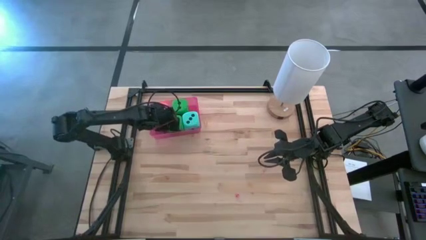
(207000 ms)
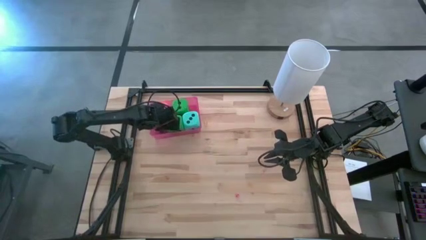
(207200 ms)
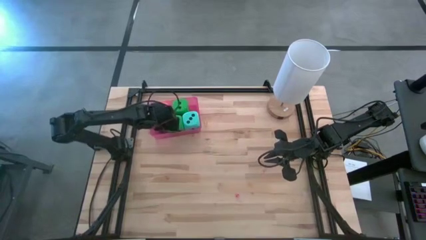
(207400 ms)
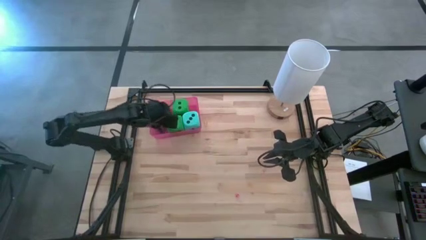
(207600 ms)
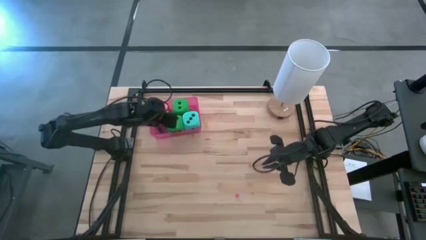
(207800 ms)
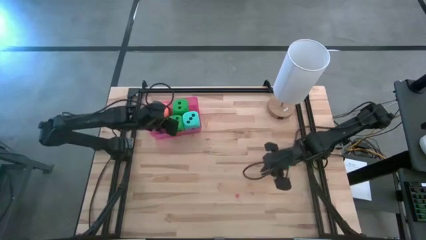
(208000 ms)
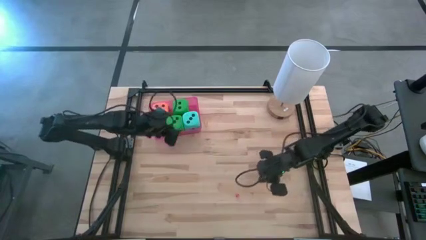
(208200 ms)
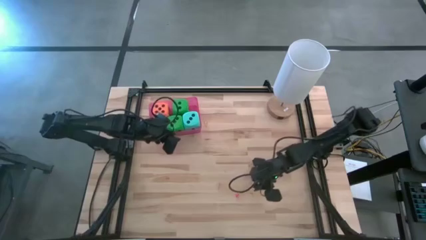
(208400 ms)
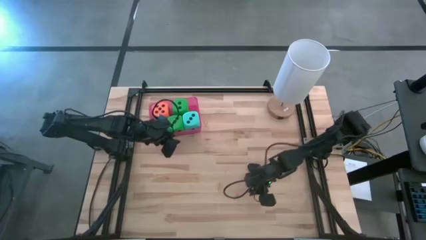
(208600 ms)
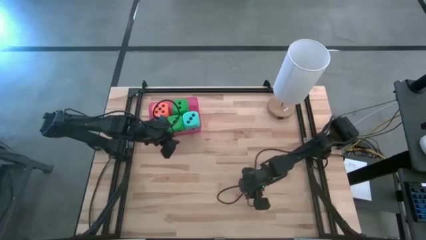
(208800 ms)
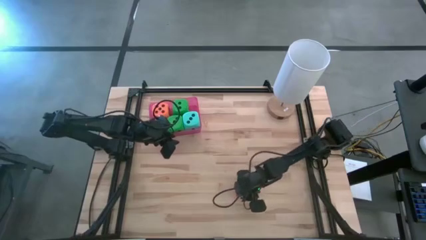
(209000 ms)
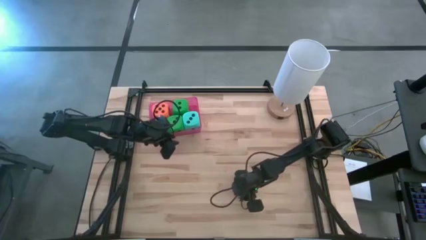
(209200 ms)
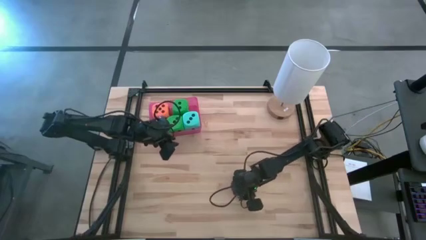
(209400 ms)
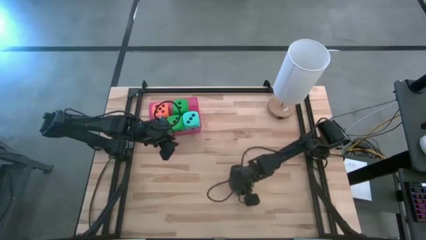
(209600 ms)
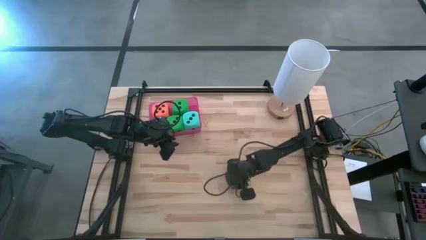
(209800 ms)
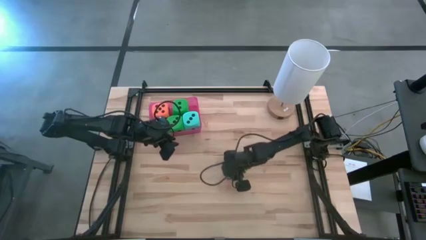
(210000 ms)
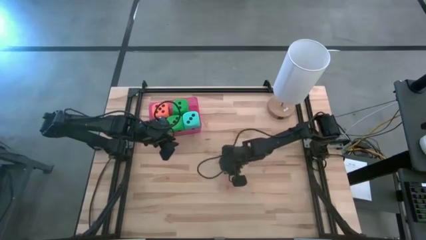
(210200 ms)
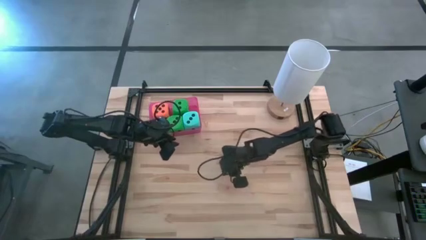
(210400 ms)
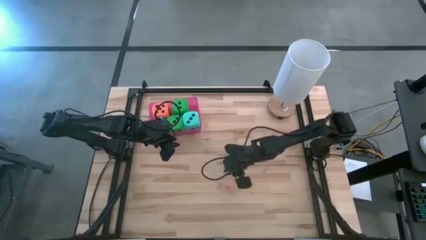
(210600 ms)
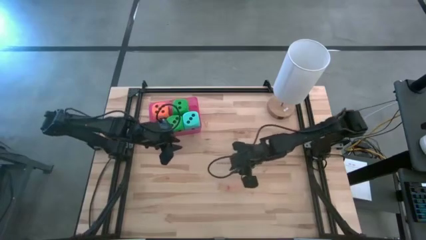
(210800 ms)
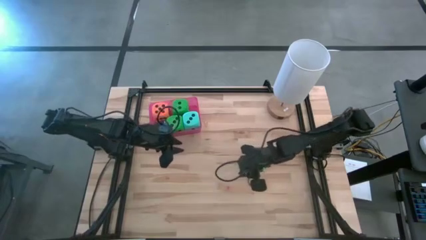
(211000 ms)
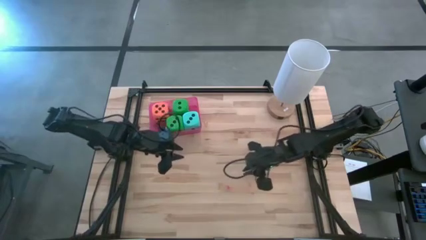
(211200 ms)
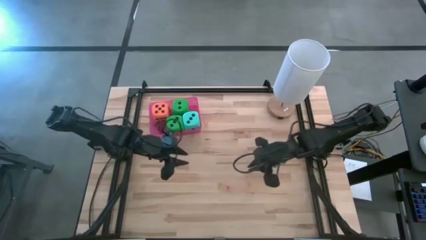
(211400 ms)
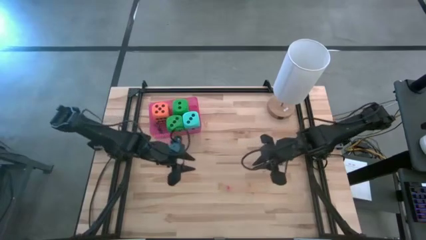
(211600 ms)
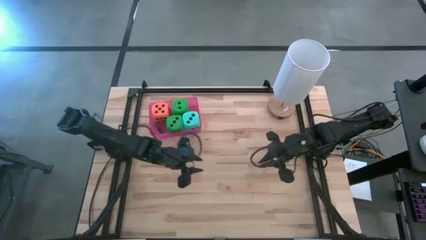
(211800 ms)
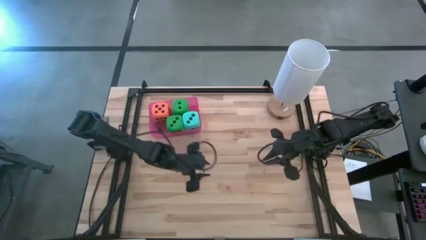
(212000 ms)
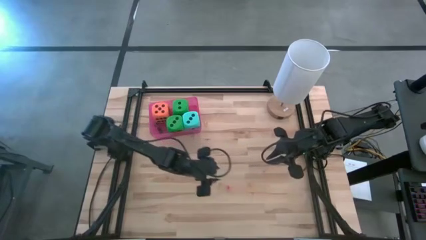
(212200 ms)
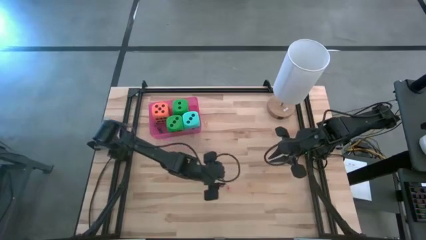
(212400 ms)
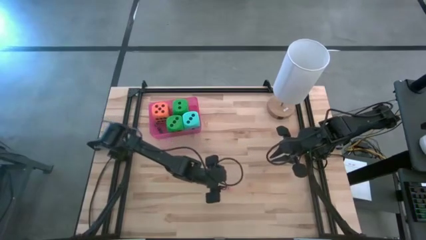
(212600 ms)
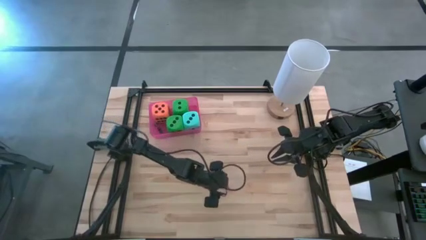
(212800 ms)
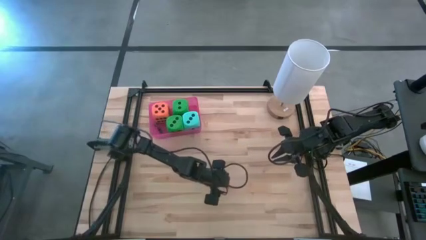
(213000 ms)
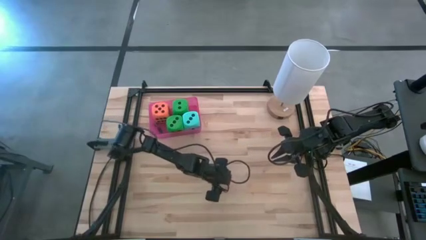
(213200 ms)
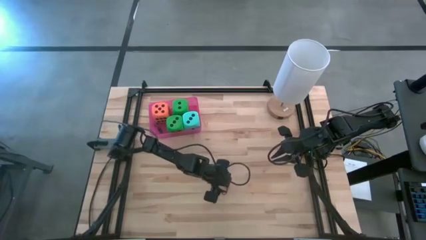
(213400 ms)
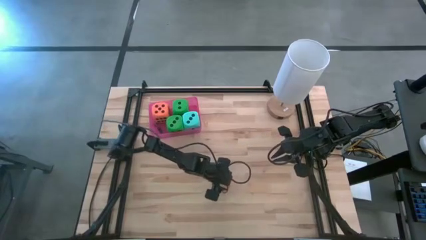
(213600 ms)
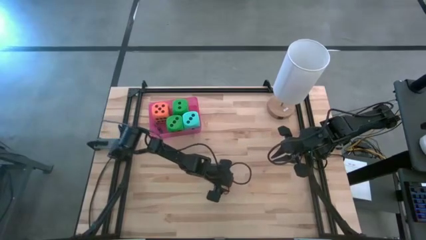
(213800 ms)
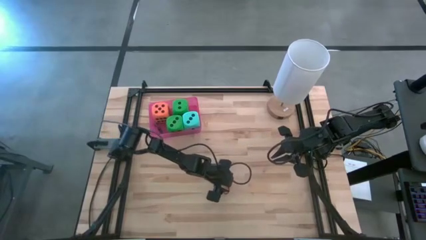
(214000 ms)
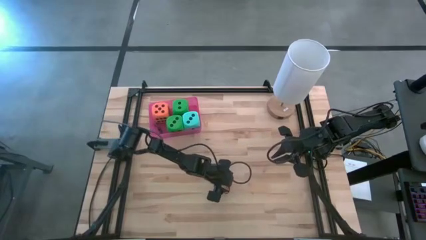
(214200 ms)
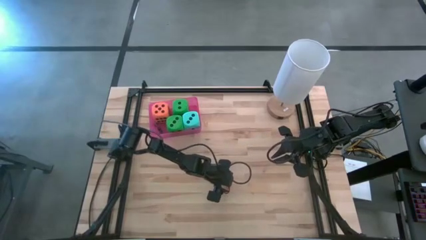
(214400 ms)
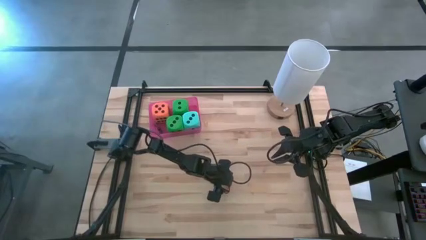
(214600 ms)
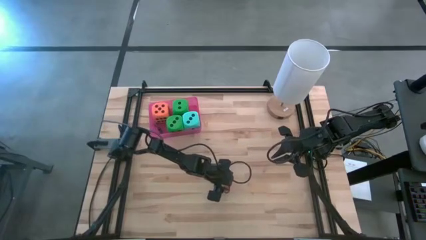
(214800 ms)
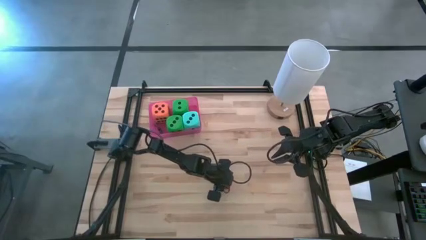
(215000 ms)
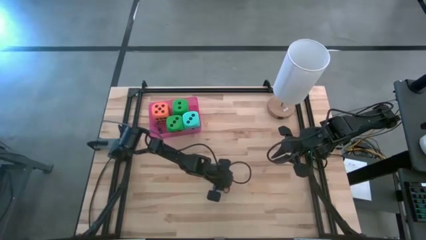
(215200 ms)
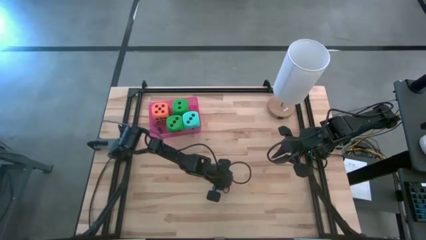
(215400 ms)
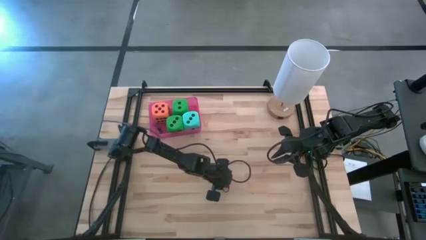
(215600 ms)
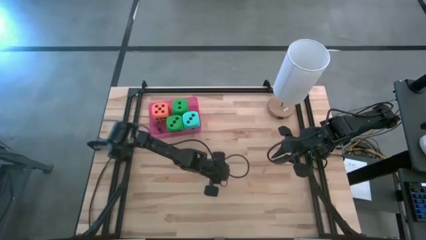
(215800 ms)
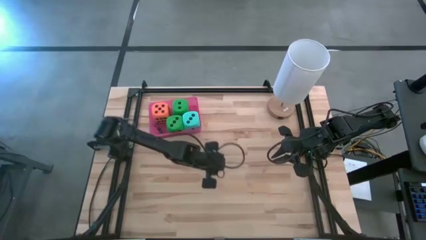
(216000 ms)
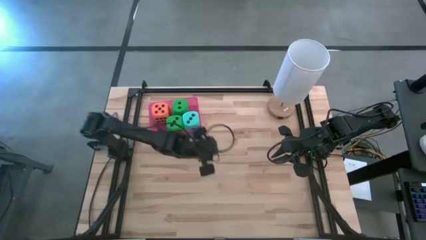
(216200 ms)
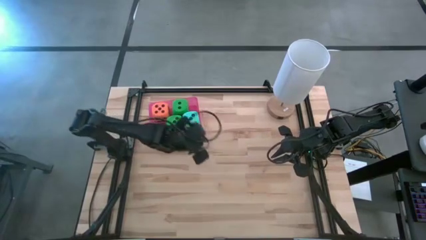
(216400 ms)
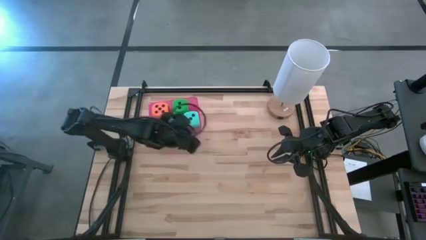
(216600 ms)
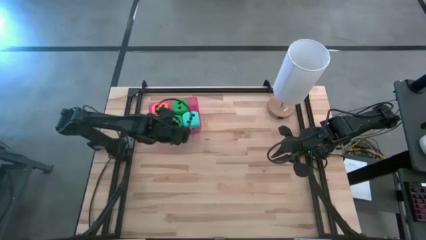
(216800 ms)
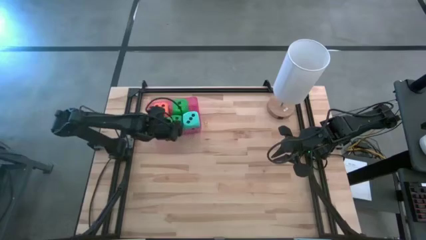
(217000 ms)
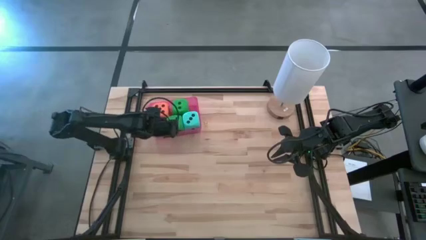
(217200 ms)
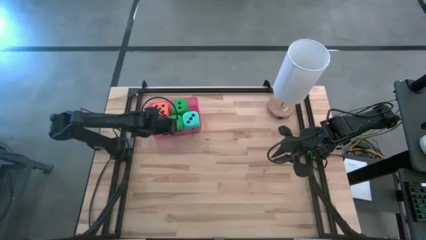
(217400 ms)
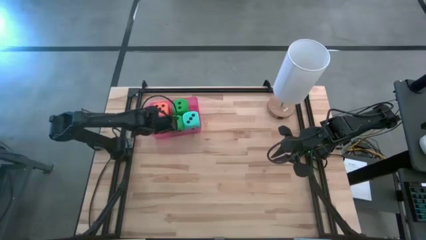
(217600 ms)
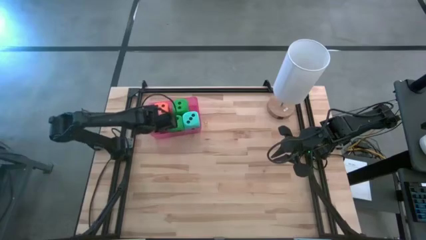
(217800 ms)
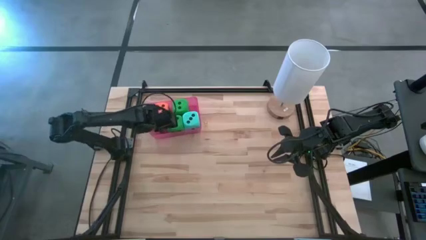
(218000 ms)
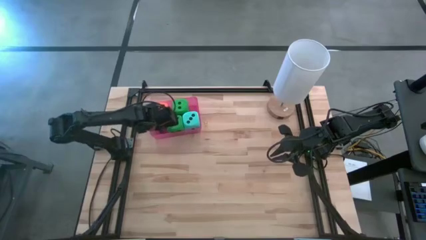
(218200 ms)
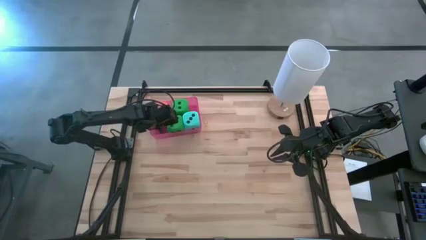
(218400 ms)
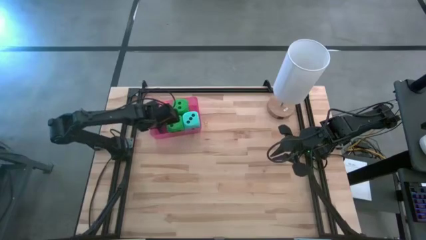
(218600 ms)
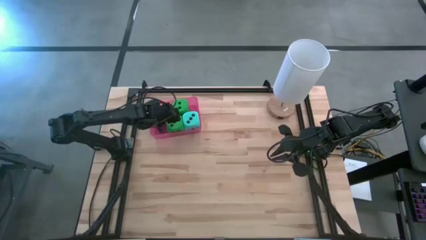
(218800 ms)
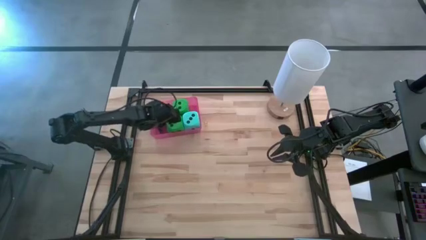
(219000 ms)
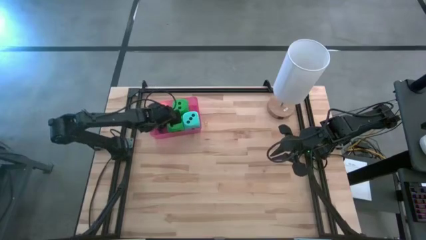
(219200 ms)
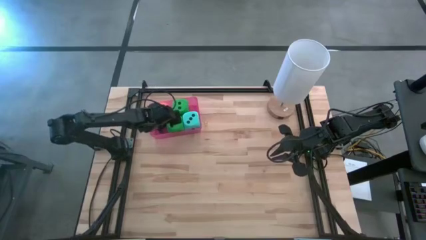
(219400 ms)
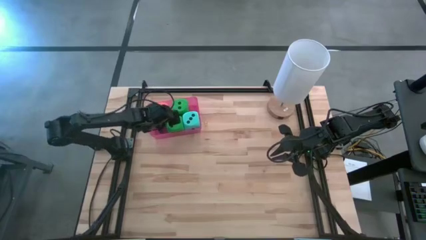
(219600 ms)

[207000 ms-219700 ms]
Task: Pick & Place Dice
Put the small red dice into the red bin

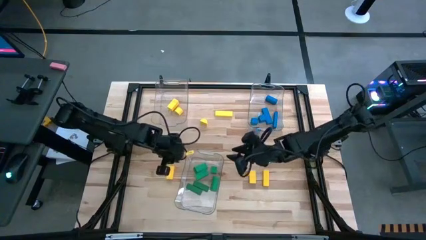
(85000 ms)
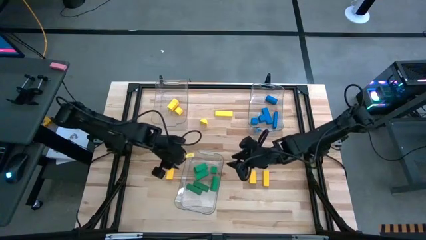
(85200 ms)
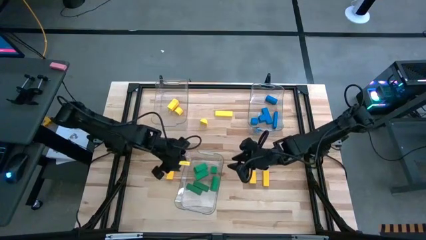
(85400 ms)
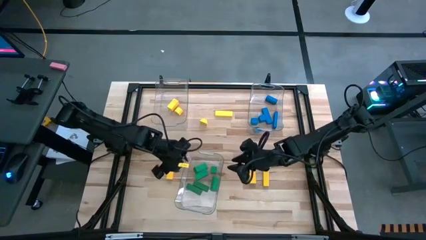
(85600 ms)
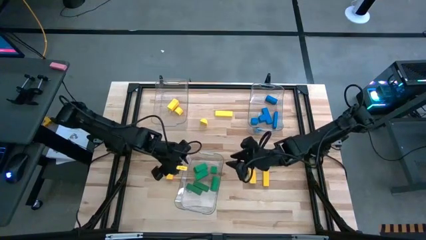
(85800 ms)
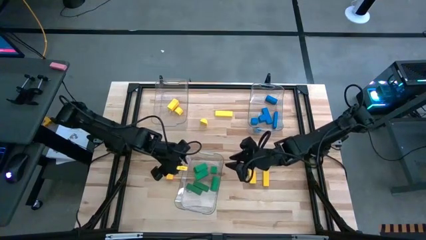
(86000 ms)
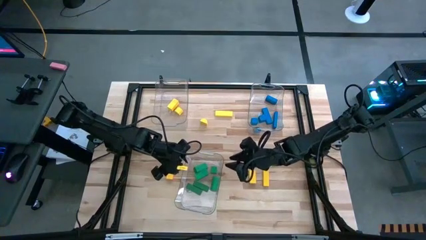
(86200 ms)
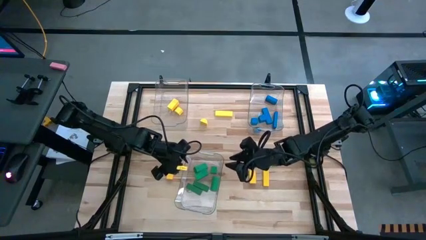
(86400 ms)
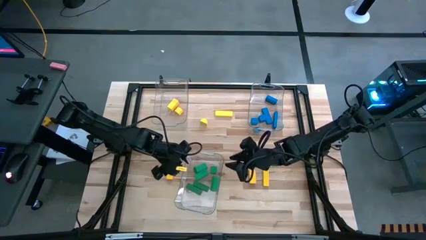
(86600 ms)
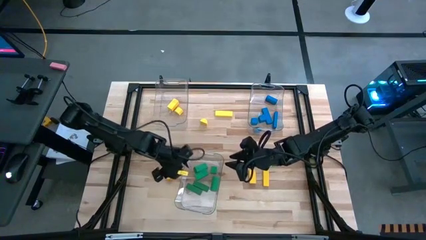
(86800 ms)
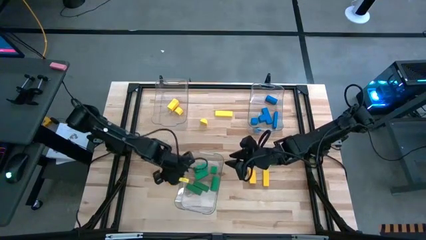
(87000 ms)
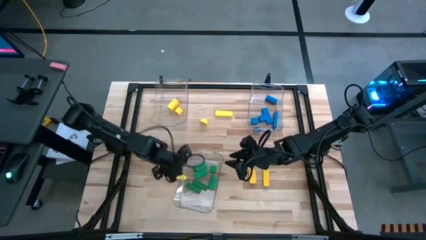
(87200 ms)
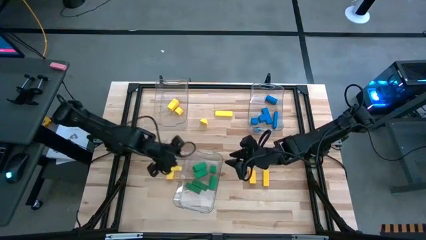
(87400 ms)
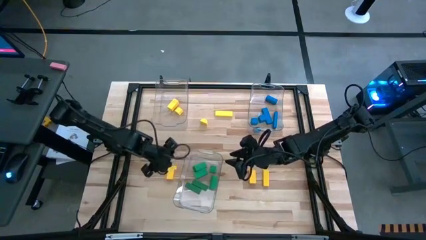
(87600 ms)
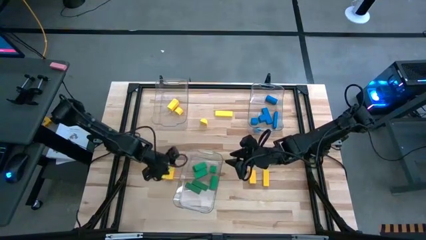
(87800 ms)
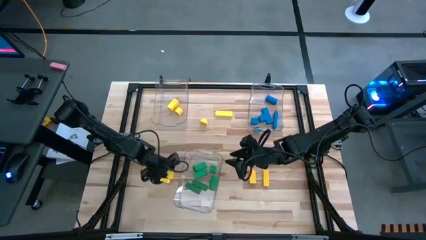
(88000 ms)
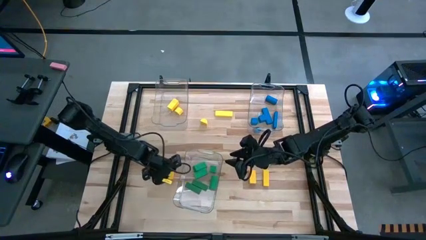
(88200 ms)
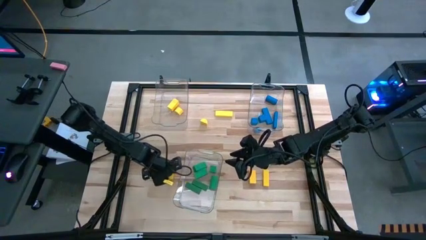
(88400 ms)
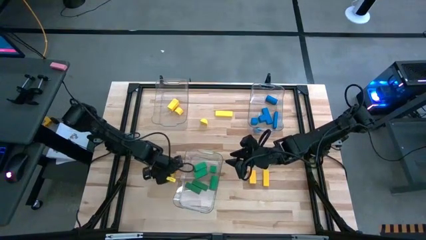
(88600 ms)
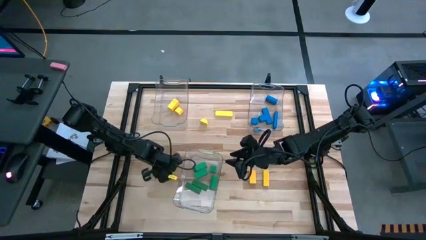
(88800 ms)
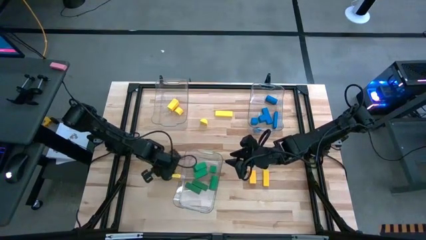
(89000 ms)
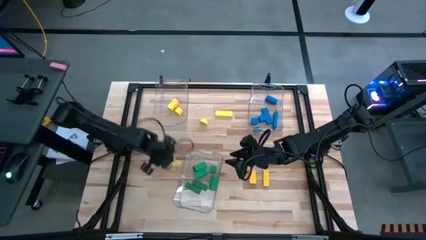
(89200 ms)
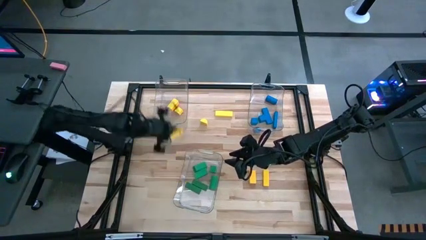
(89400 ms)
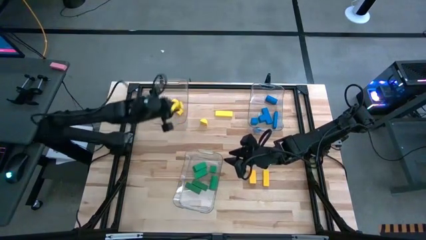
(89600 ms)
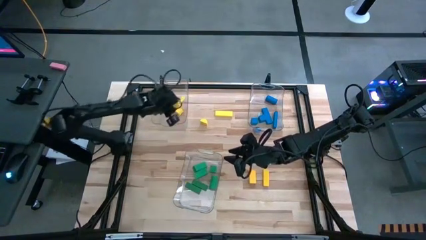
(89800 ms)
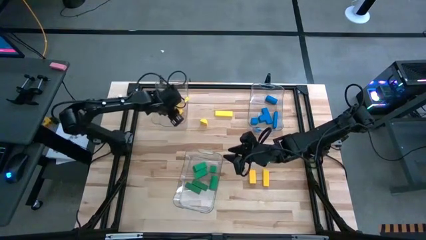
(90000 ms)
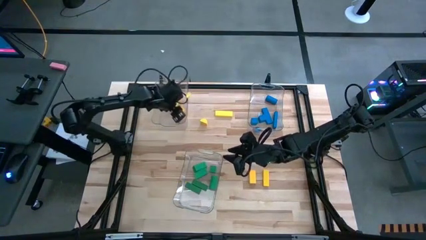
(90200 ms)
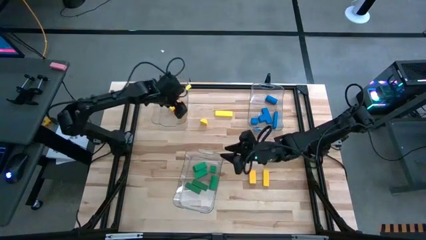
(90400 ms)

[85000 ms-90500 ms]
Task: Sort blocks
Put the yellow block into the top left transparent bin
